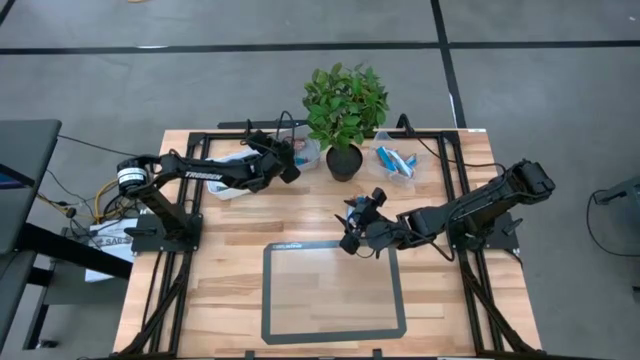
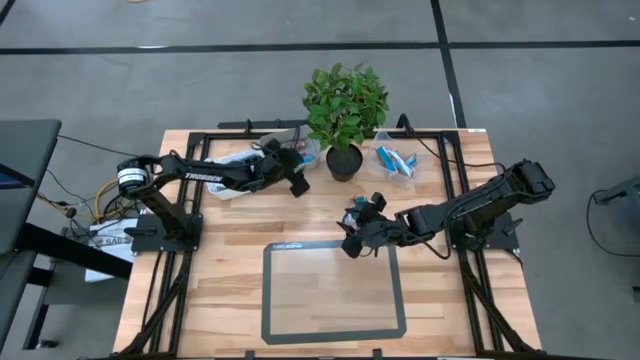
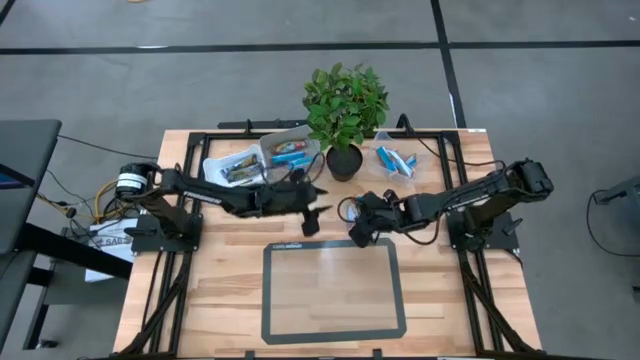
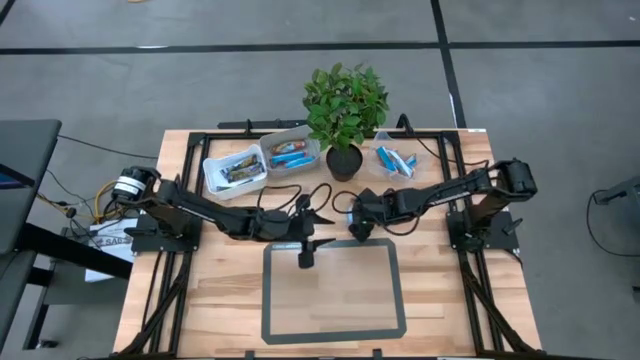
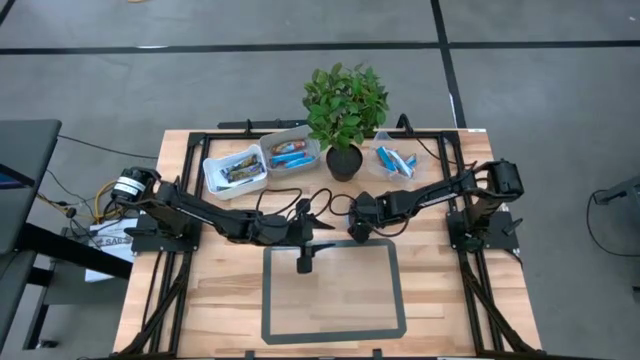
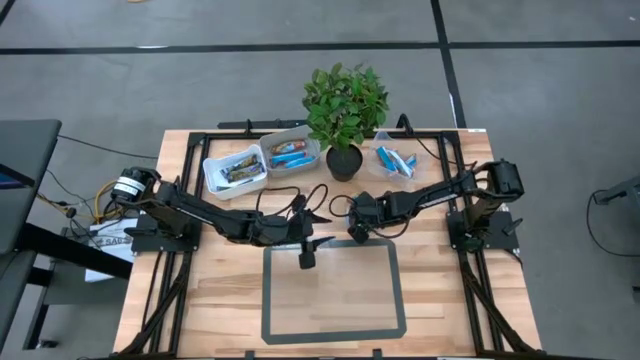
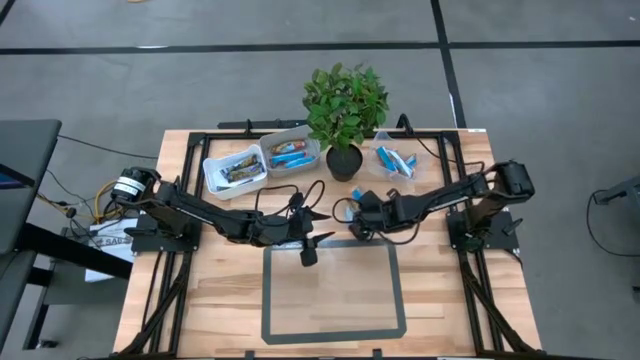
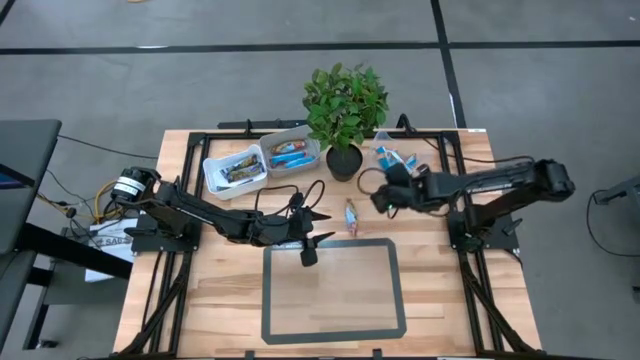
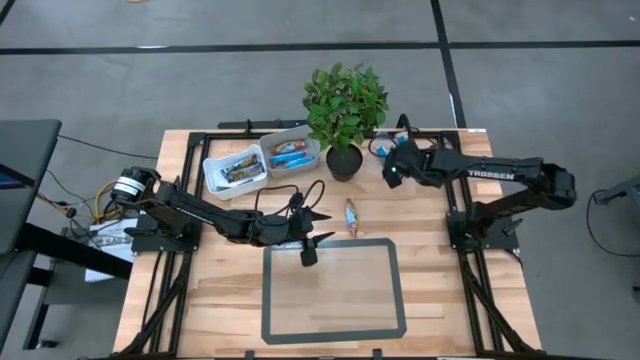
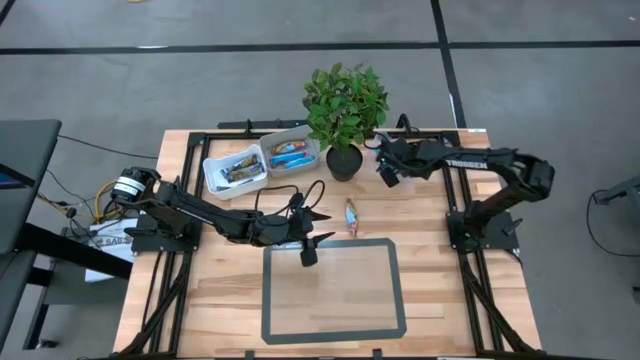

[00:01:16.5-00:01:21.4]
Task: Pick and place Granola Bars by type
Put the yellow granola bar into the transparent bin

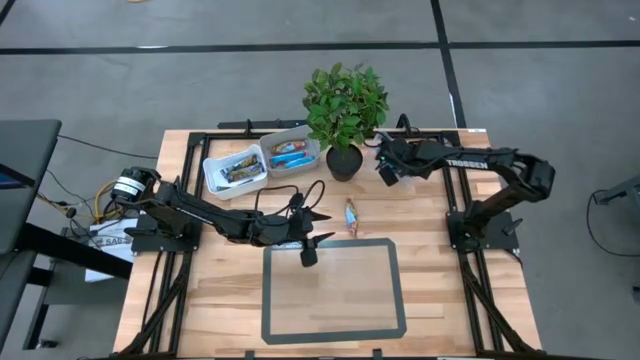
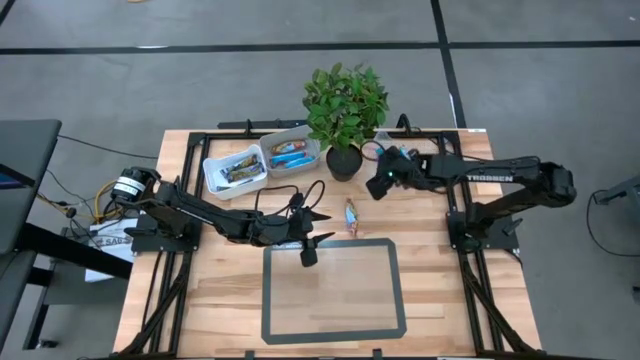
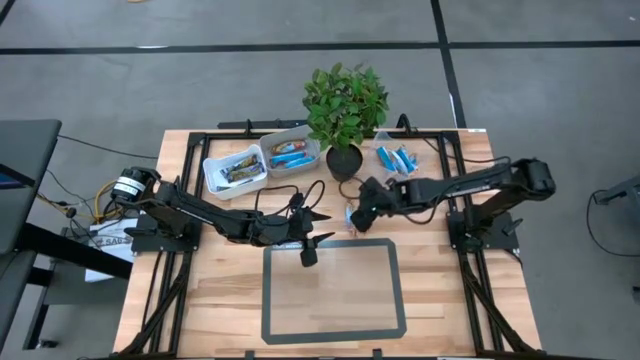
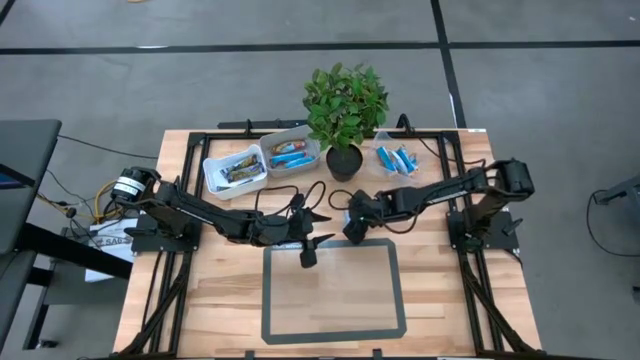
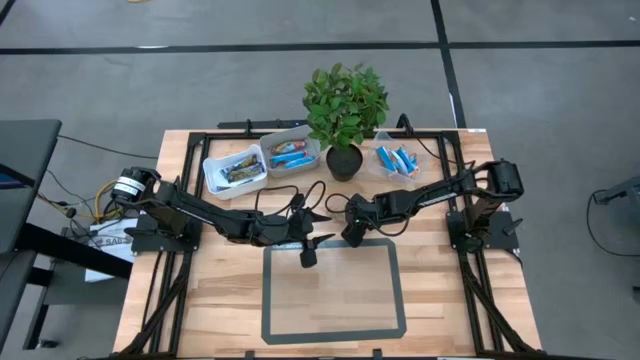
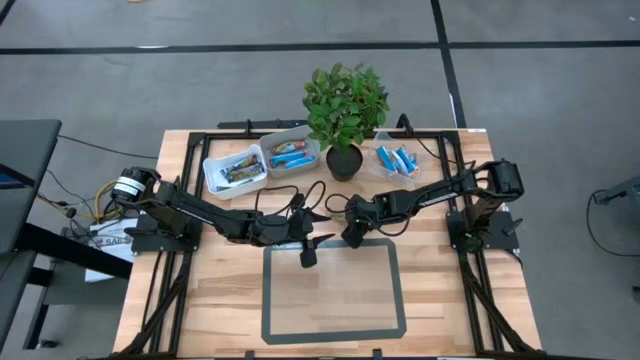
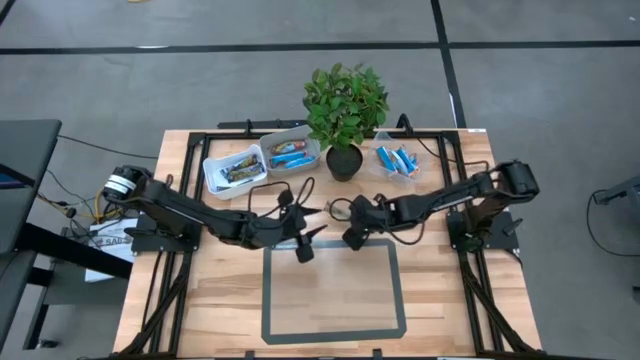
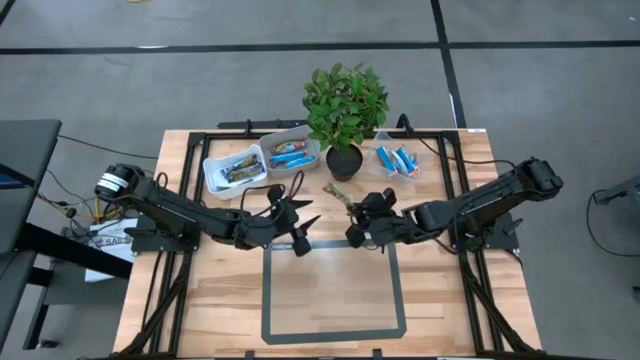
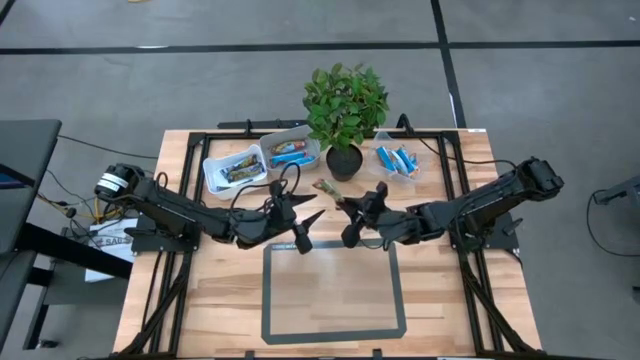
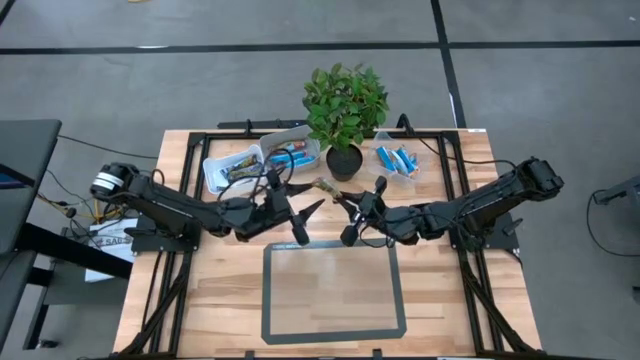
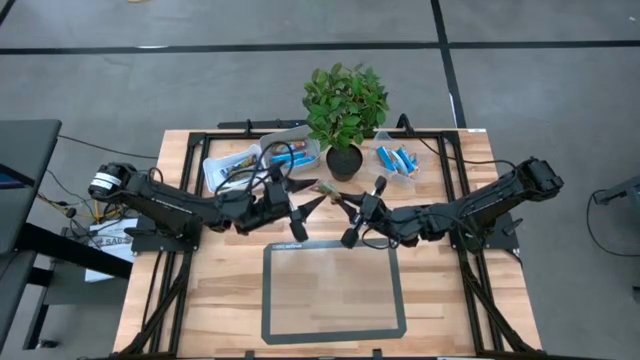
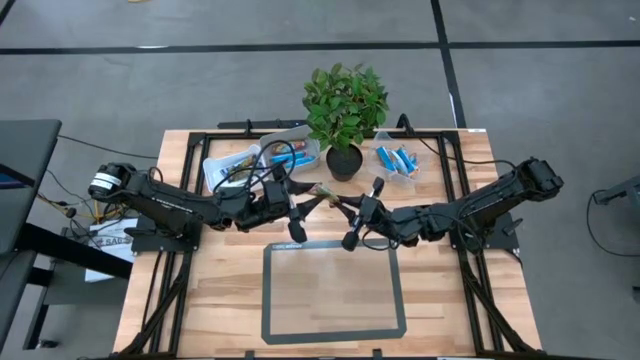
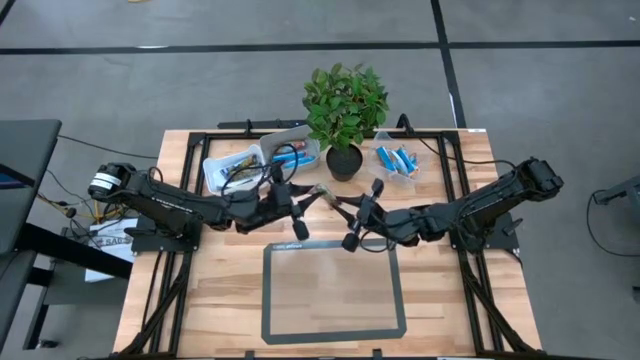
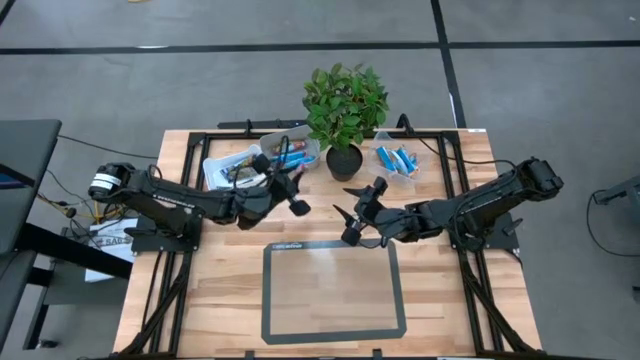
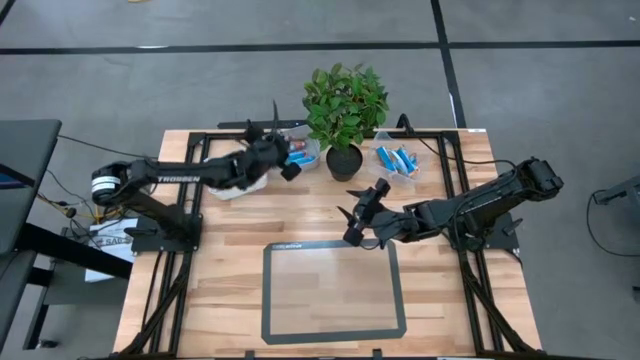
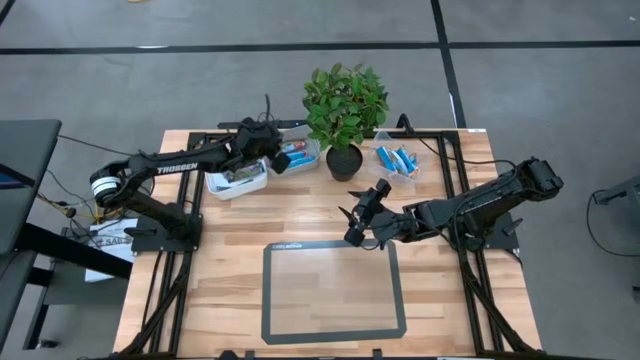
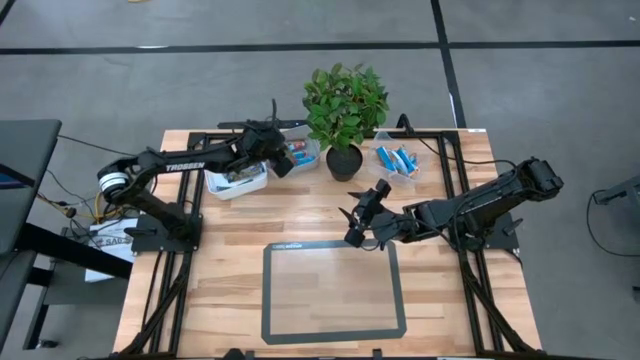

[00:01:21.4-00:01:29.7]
Put the red granola bar into the gray bin

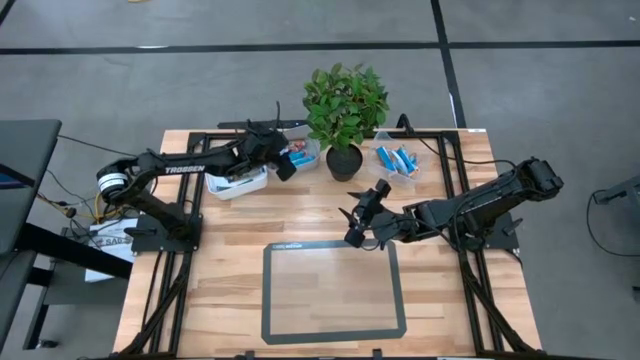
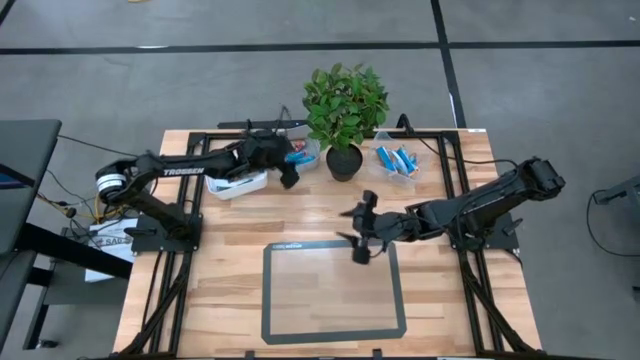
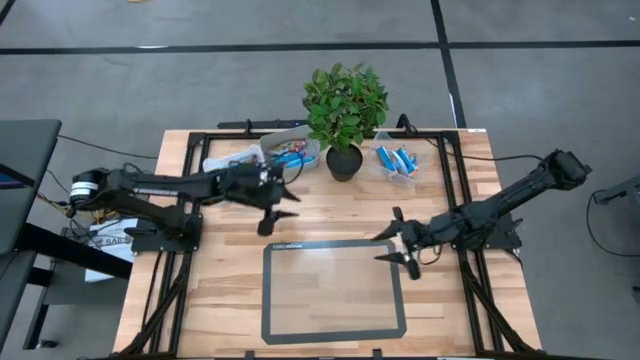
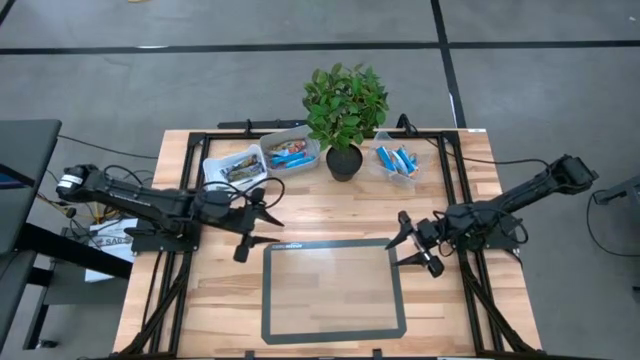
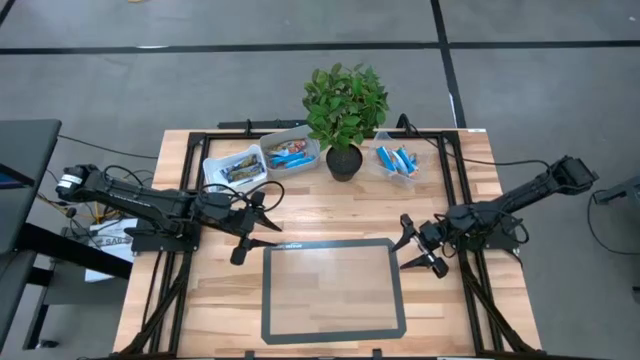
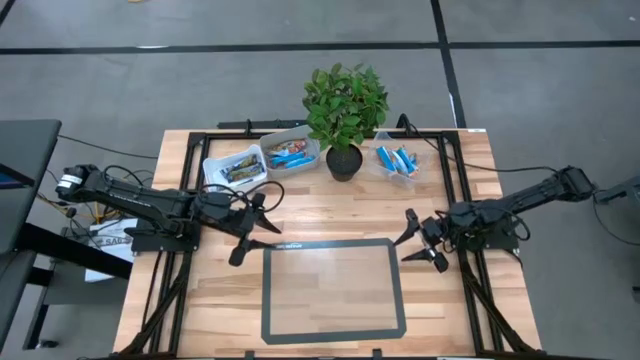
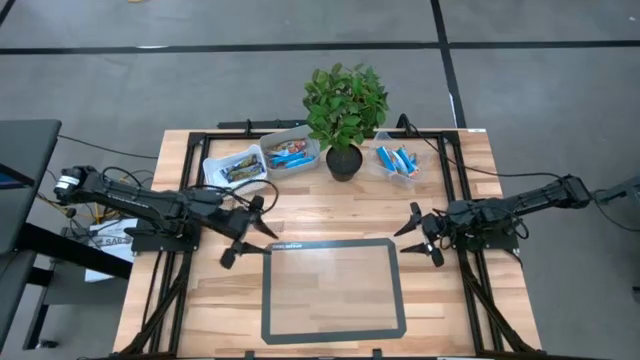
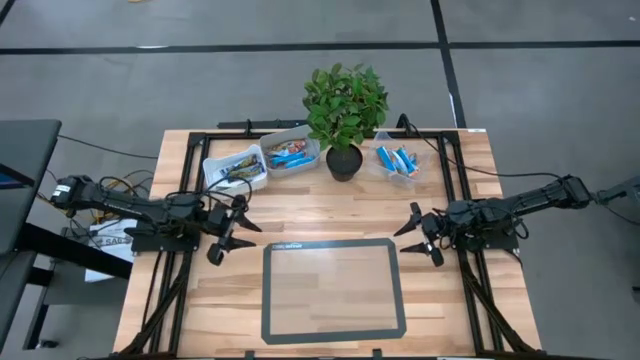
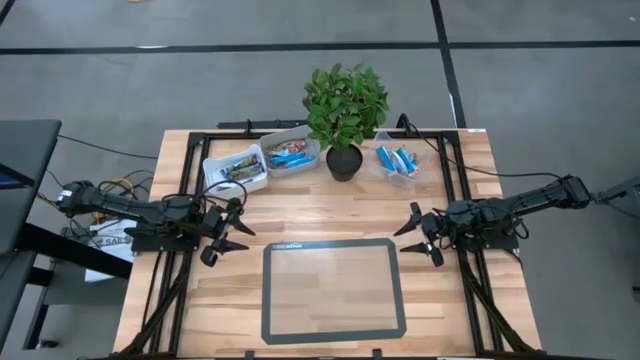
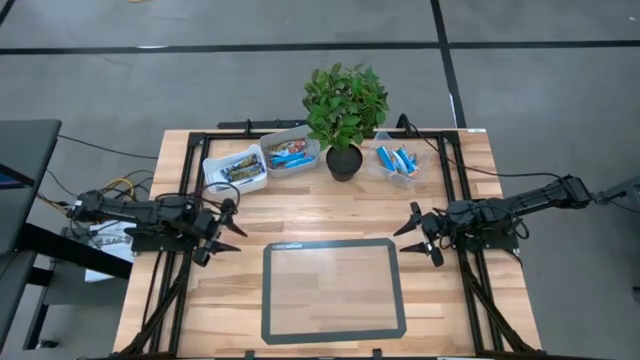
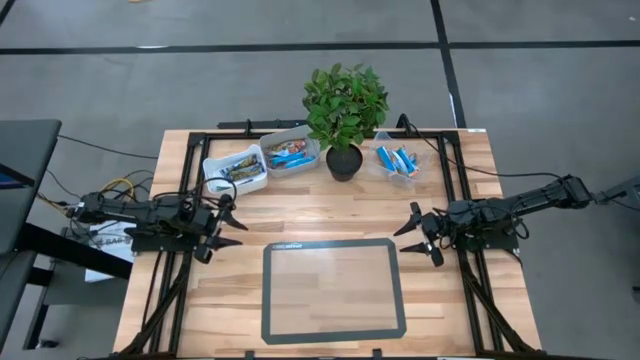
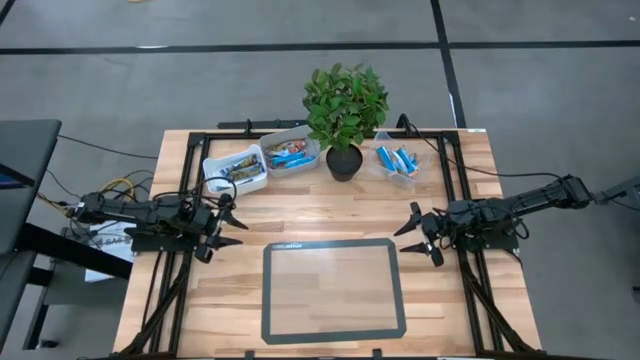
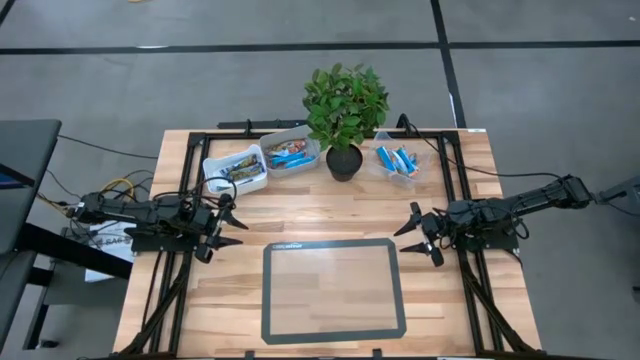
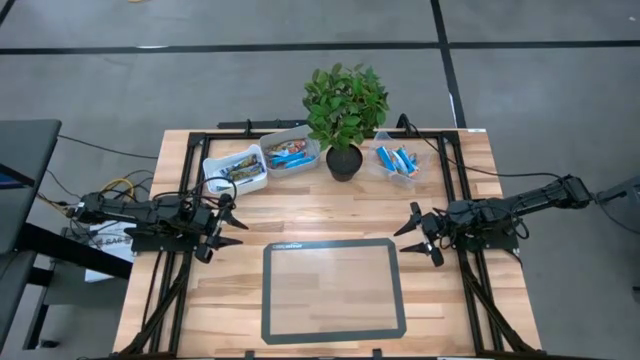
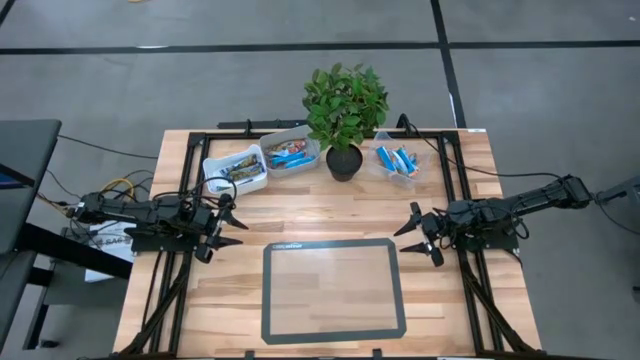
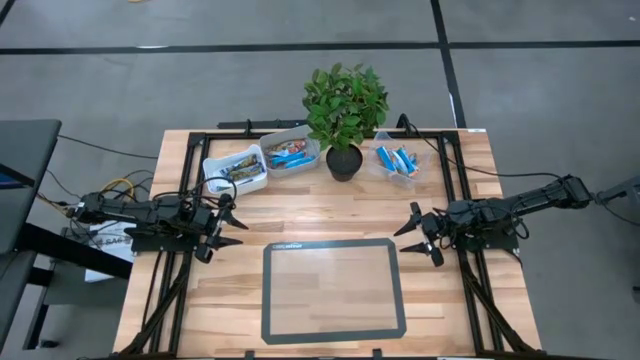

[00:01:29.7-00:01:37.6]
Return to Home Position
